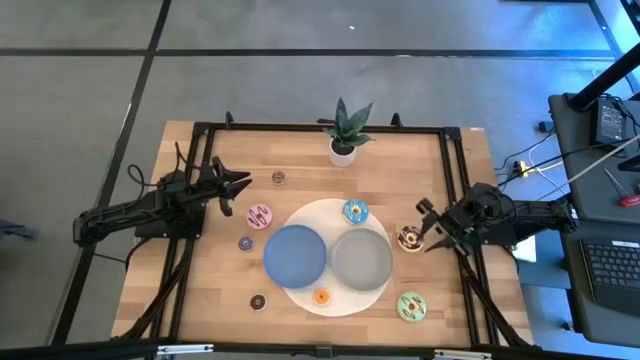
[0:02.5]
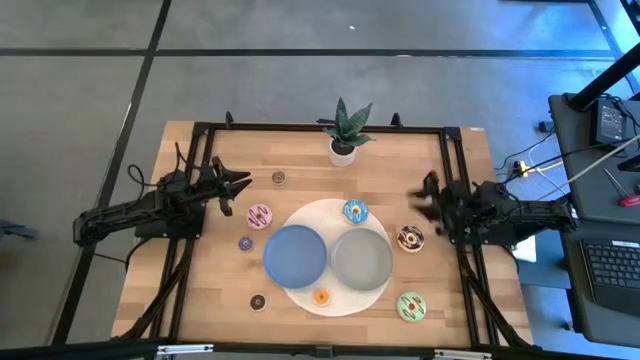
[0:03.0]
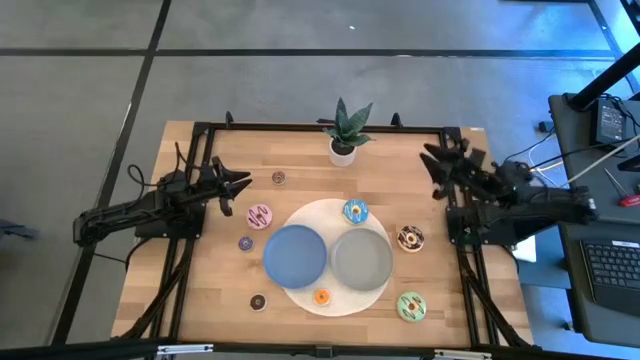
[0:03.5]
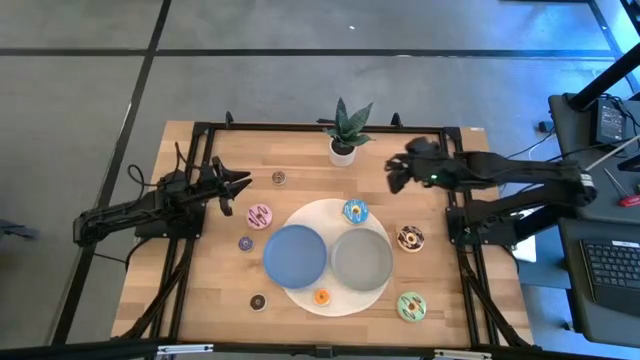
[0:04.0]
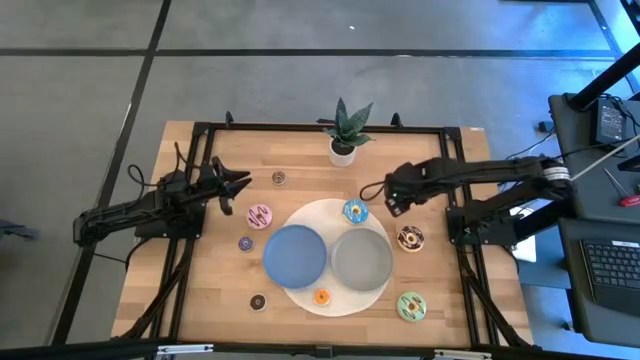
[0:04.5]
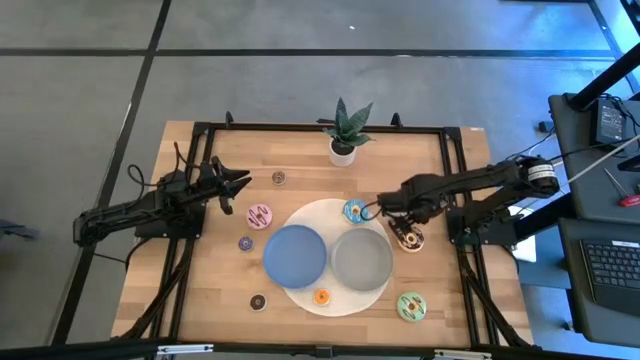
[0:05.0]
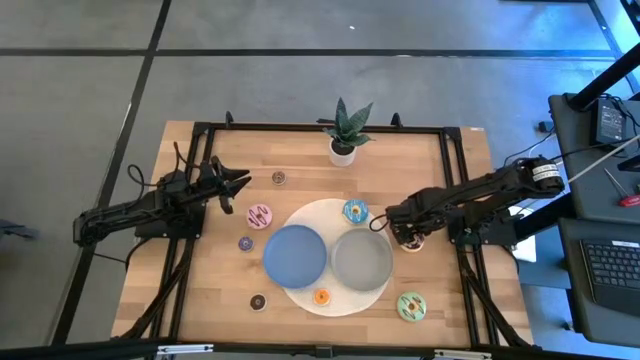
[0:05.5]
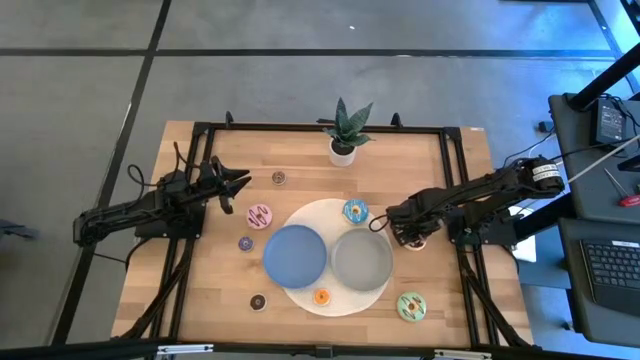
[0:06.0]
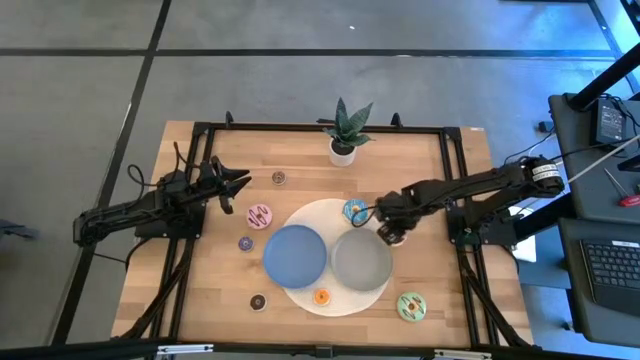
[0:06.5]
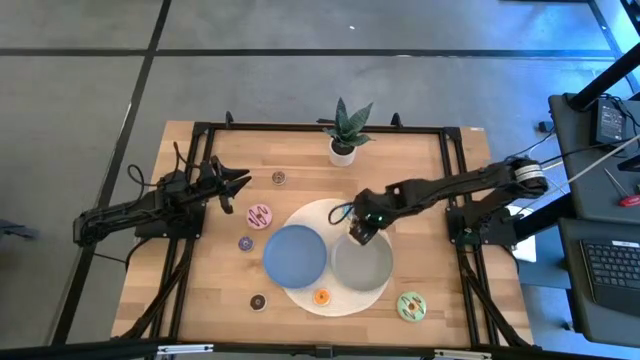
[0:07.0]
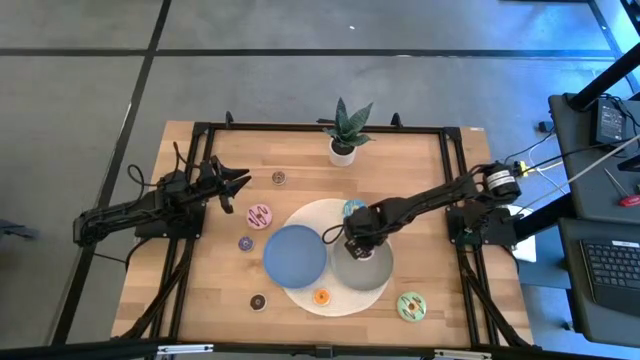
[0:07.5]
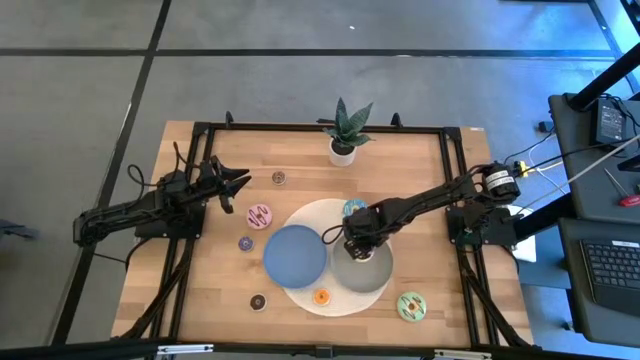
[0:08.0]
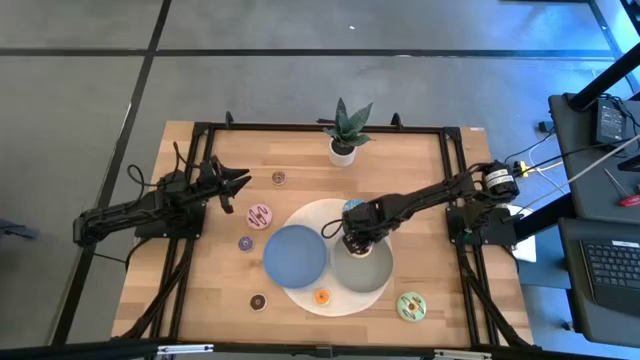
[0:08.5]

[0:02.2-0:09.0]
Task: Pick & Place donuts
Put the big black donut on the gray plate

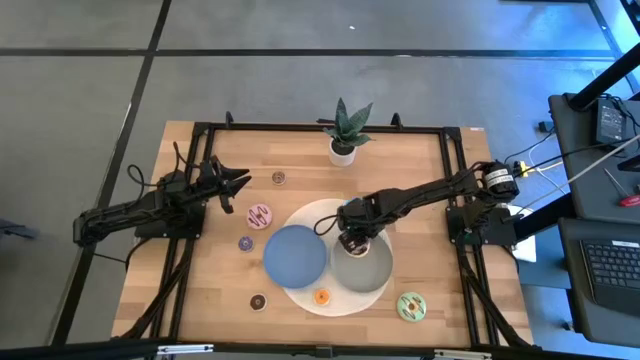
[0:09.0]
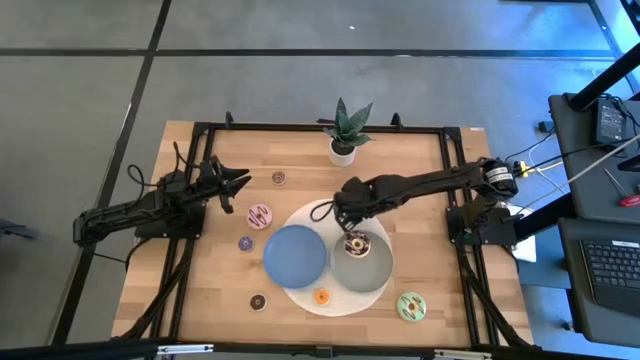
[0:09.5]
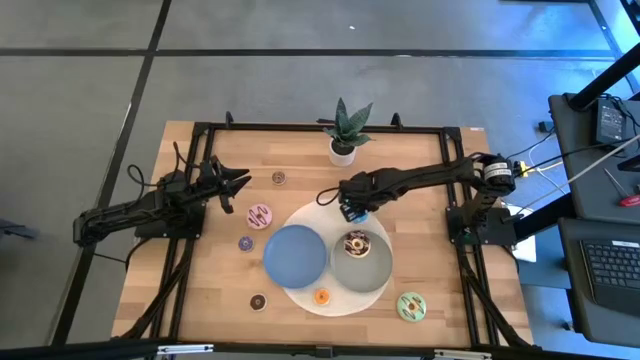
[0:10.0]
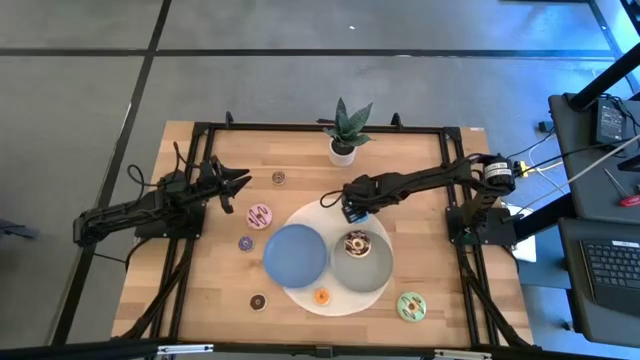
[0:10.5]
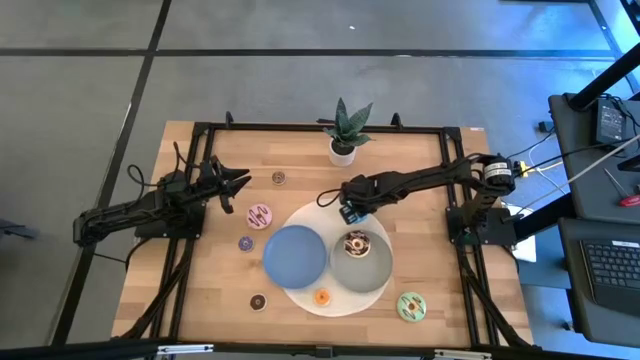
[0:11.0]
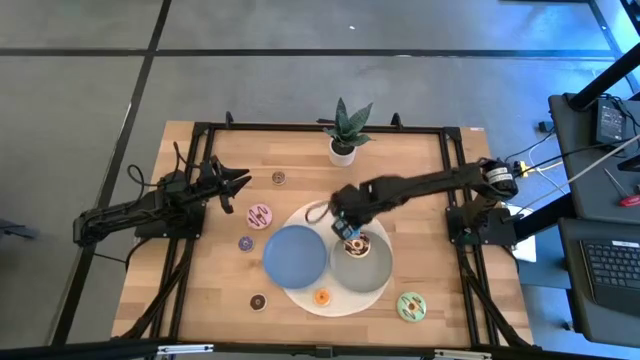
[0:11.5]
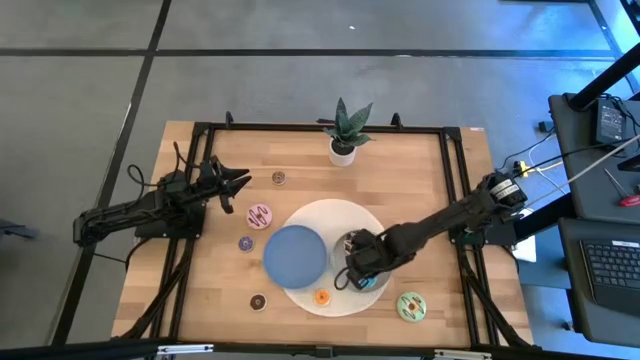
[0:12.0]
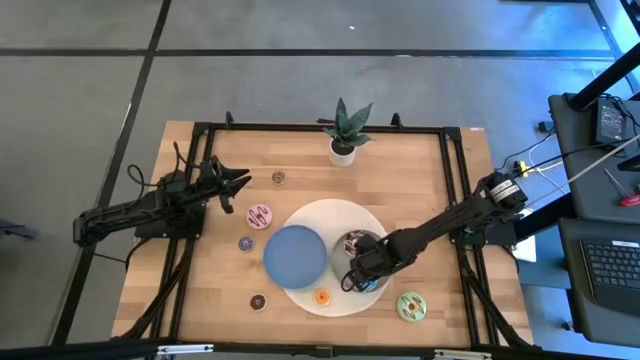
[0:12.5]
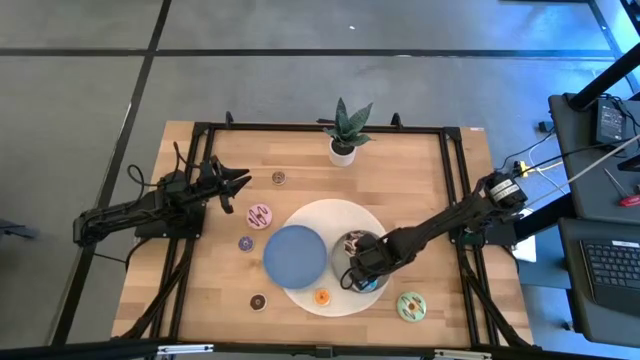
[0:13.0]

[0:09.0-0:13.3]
Put the big blue donut on the gray plate

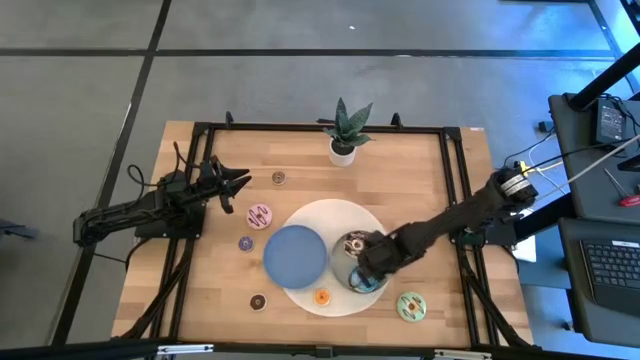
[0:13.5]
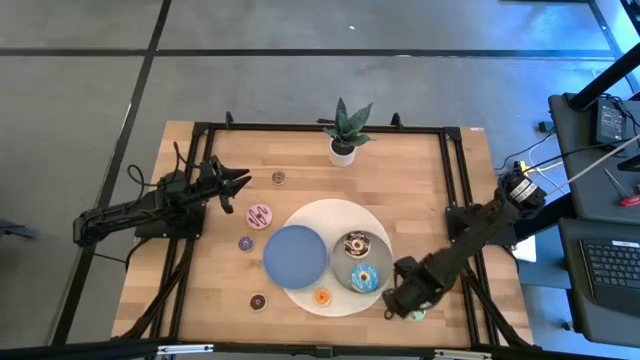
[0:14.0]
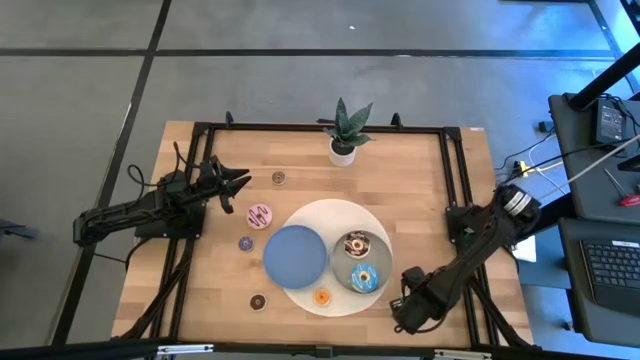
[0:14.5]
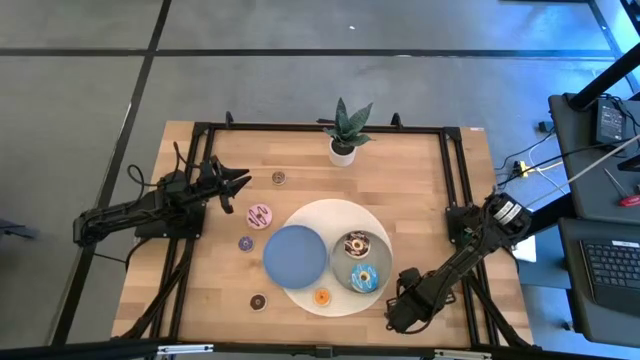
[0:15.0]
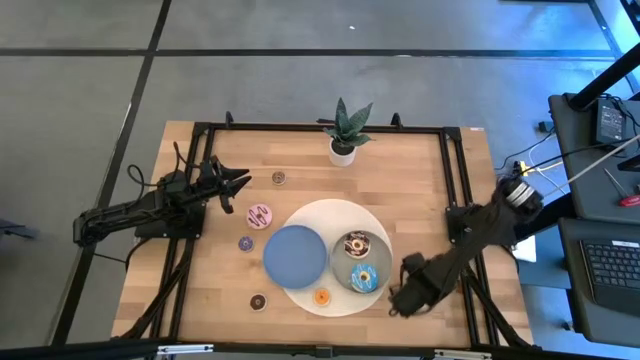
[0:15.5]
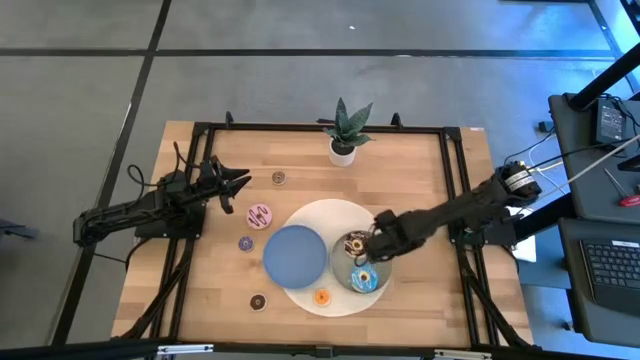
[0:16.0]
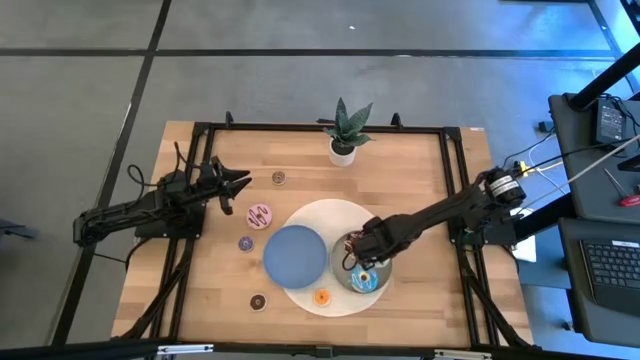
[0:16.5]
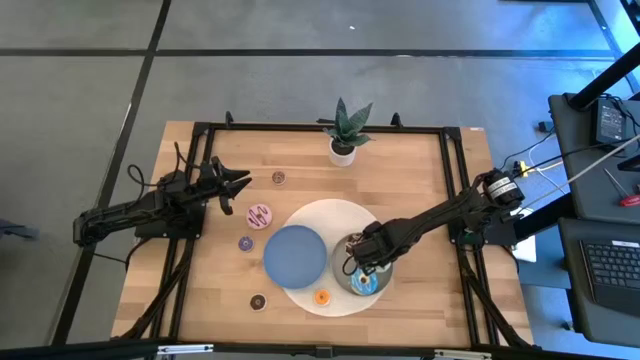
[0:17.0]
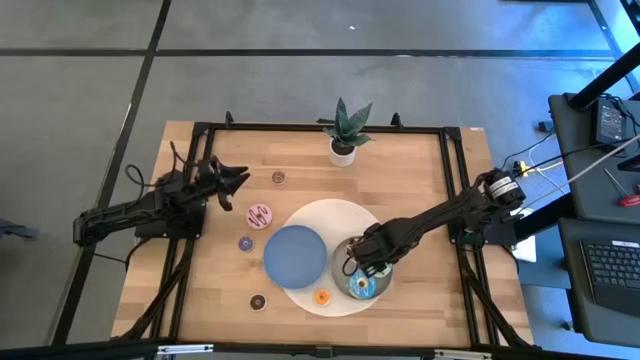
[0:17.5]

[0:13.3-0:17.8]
Put the big green donut on the gray plate

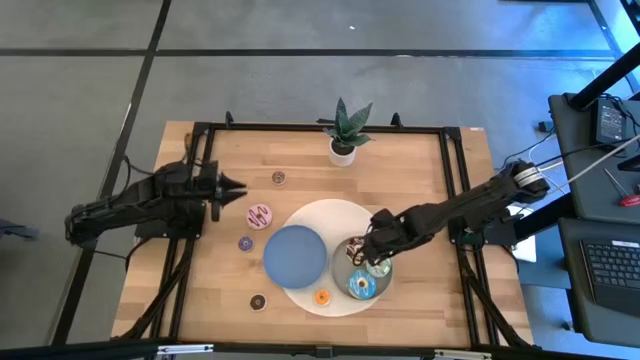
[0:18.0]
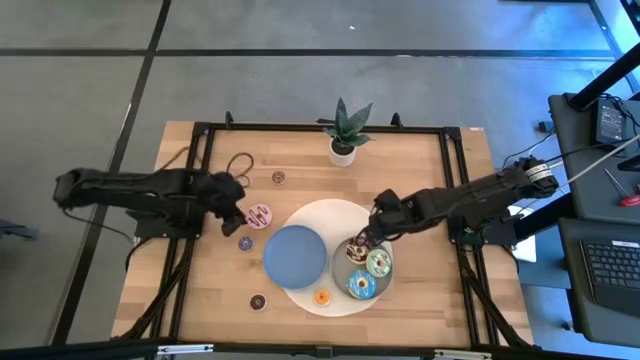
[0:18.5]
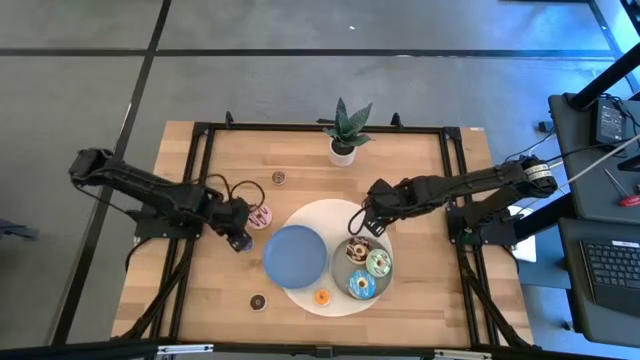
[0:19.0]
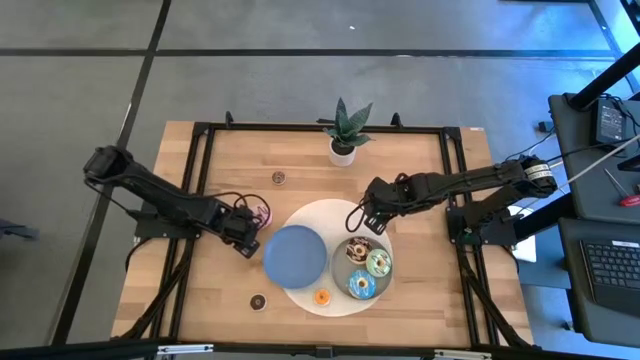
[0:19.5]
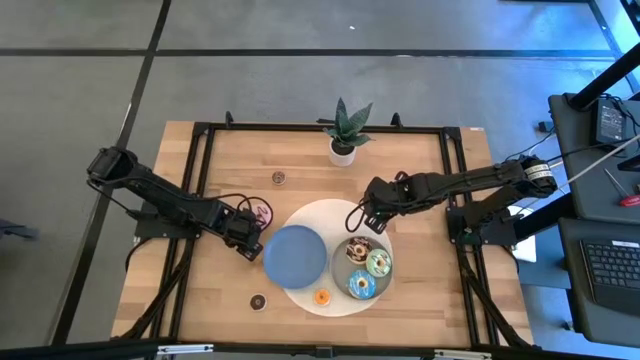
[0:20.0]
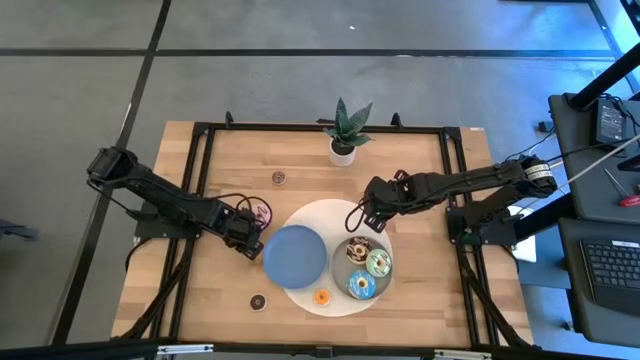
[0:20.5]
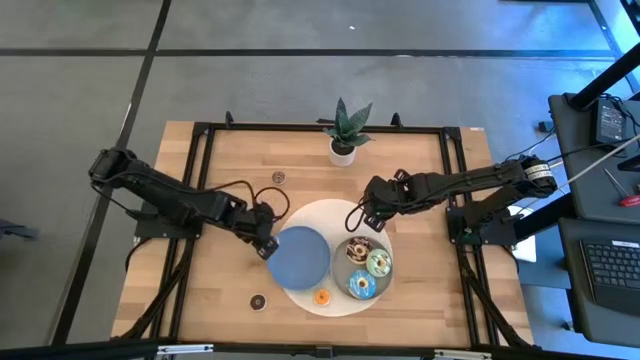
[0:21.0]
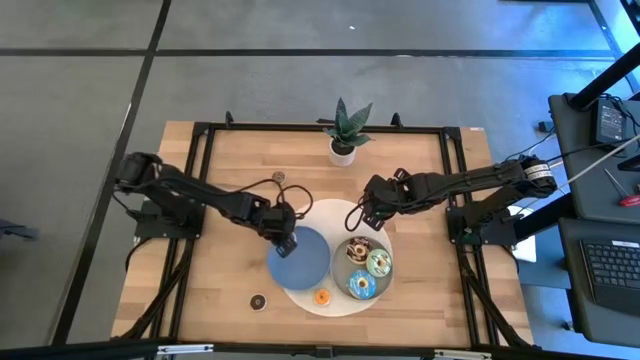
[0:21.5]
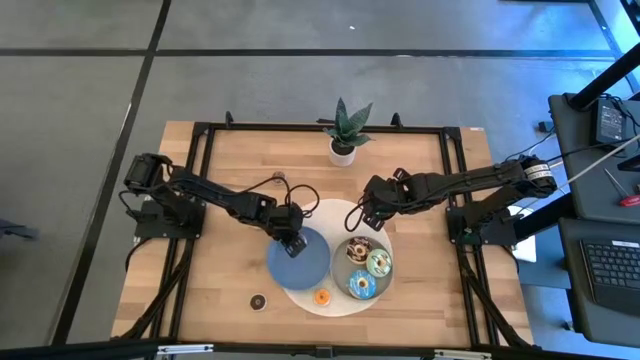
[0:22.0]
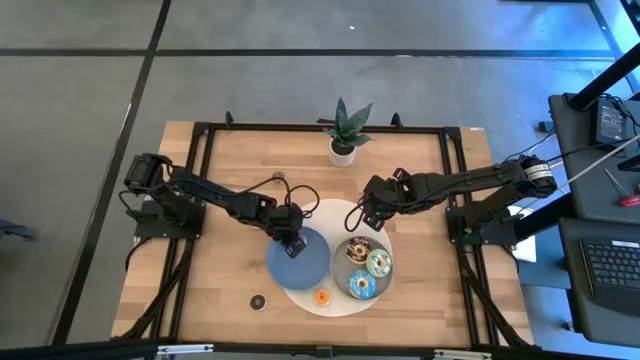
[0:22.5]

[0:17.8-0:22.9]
Put the small violet donut on the blue plate
